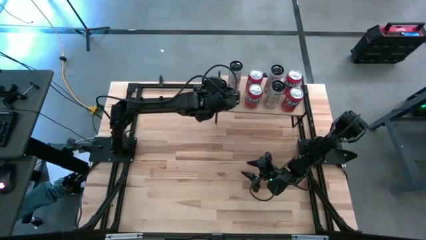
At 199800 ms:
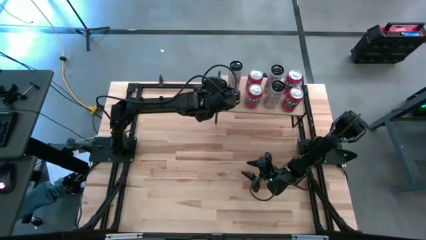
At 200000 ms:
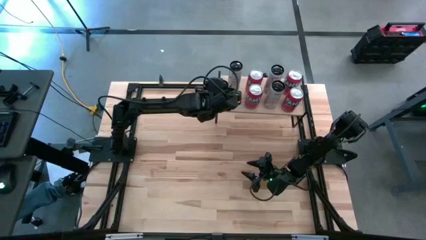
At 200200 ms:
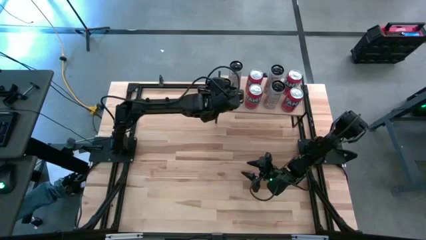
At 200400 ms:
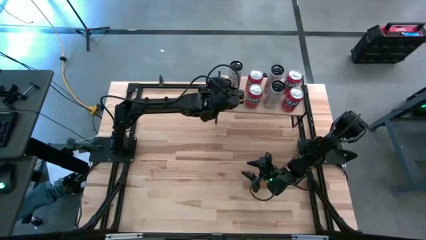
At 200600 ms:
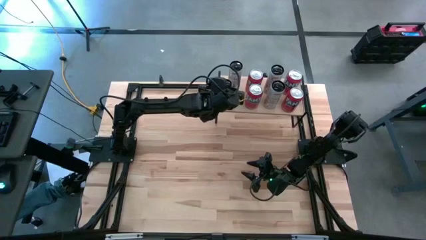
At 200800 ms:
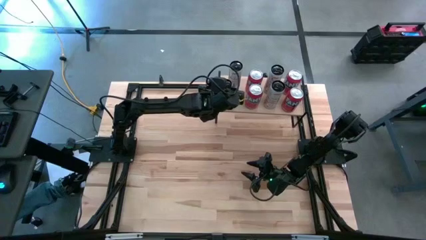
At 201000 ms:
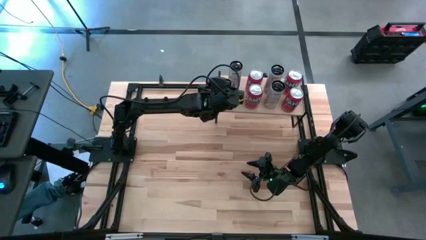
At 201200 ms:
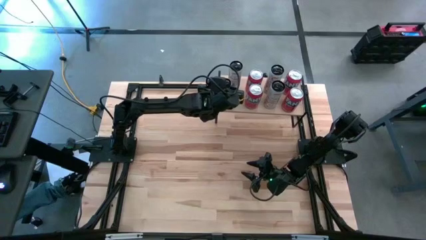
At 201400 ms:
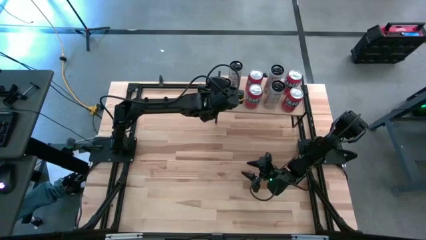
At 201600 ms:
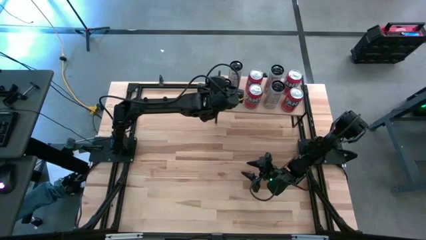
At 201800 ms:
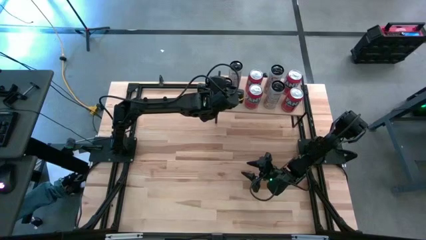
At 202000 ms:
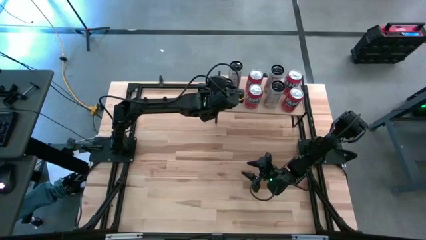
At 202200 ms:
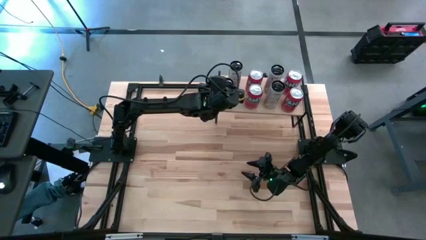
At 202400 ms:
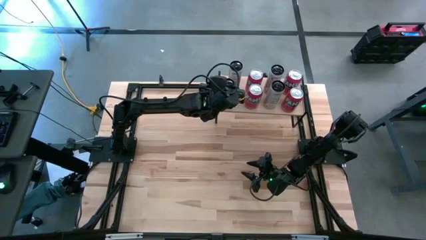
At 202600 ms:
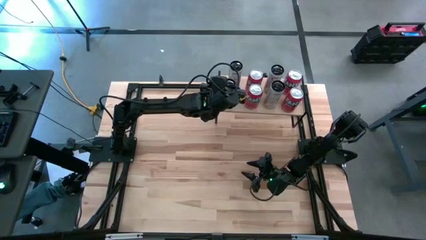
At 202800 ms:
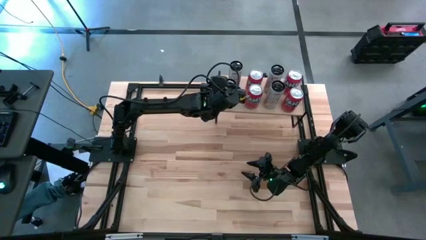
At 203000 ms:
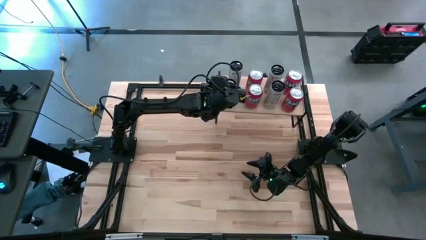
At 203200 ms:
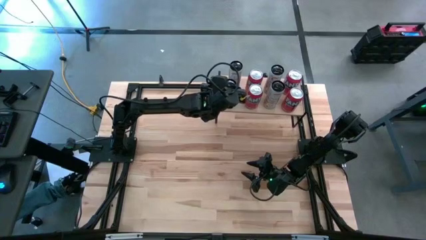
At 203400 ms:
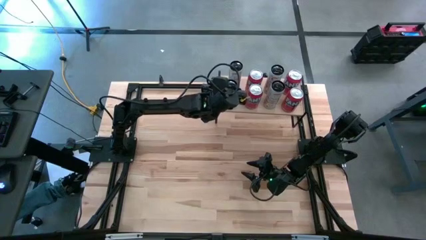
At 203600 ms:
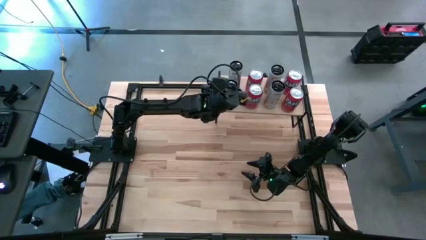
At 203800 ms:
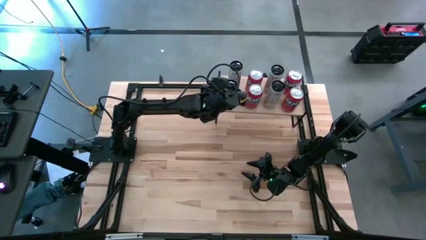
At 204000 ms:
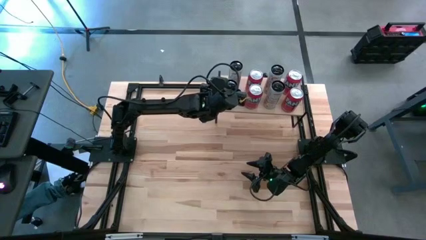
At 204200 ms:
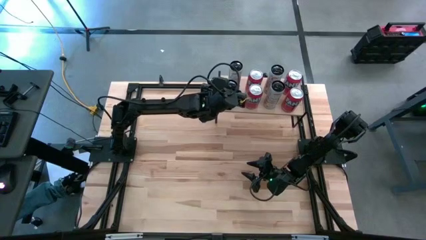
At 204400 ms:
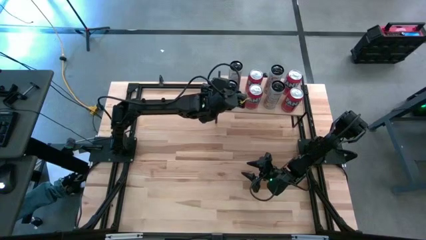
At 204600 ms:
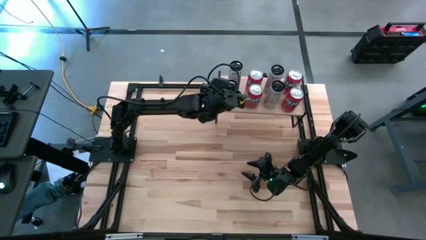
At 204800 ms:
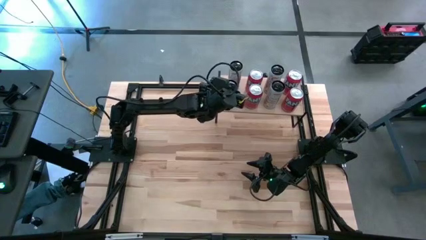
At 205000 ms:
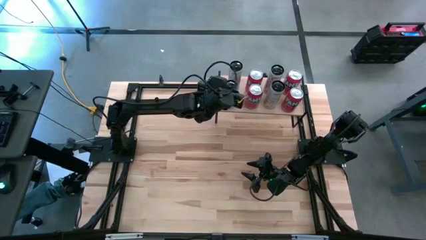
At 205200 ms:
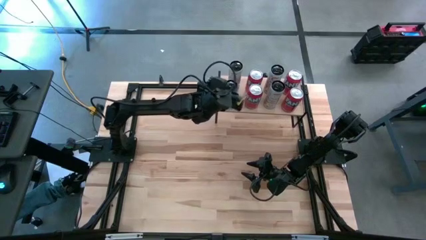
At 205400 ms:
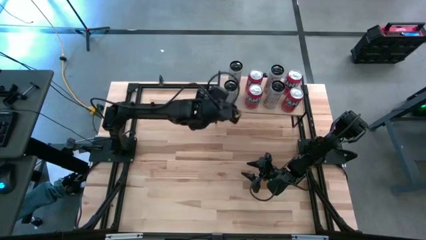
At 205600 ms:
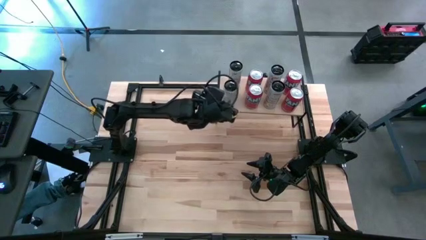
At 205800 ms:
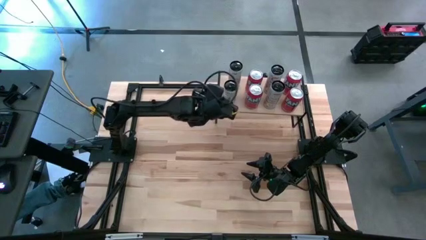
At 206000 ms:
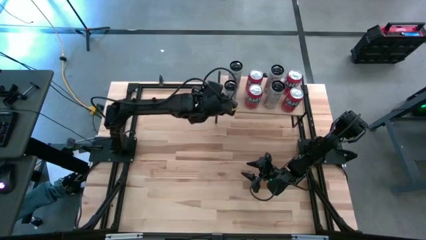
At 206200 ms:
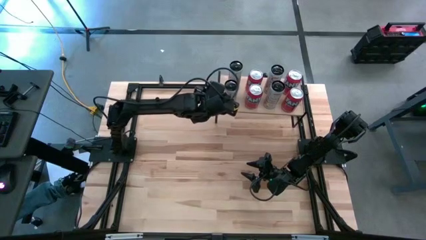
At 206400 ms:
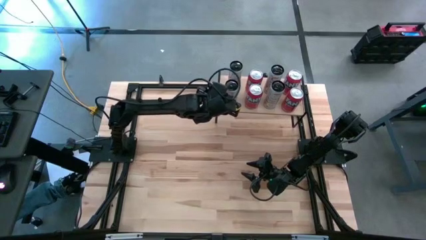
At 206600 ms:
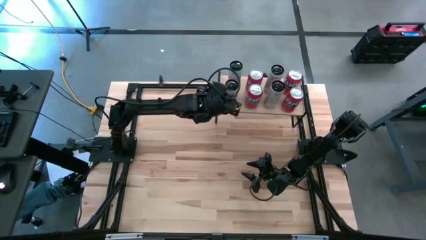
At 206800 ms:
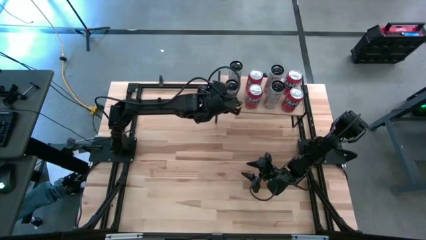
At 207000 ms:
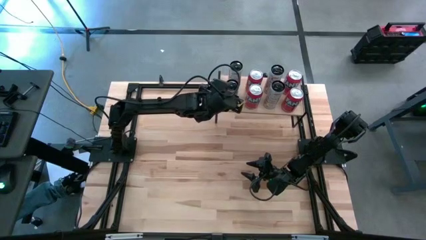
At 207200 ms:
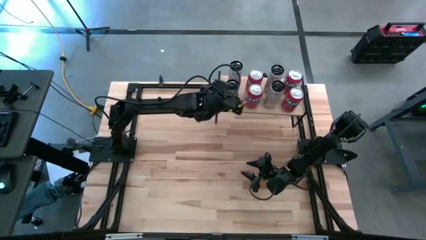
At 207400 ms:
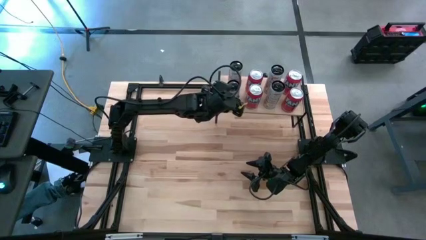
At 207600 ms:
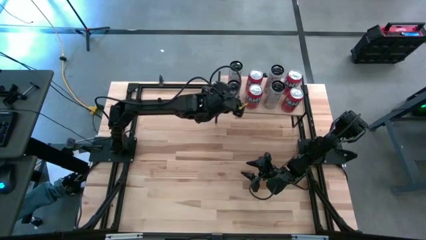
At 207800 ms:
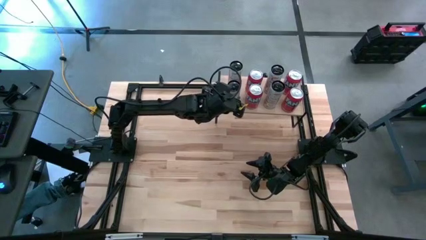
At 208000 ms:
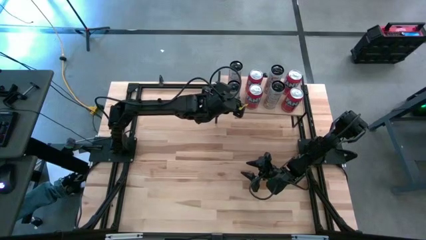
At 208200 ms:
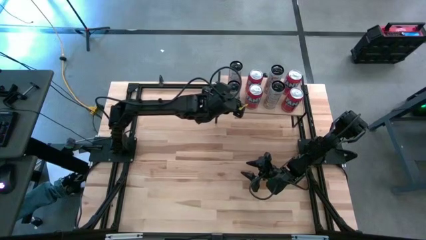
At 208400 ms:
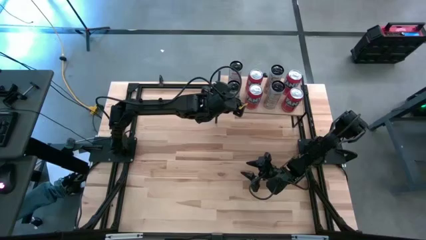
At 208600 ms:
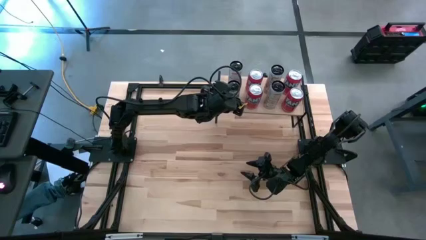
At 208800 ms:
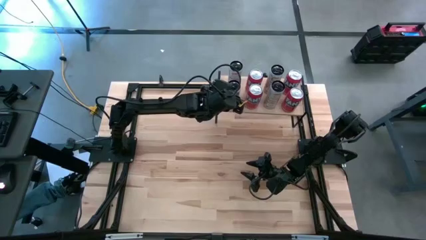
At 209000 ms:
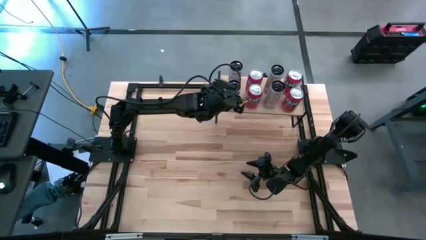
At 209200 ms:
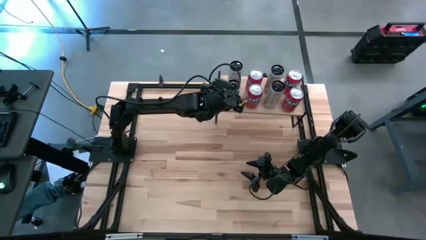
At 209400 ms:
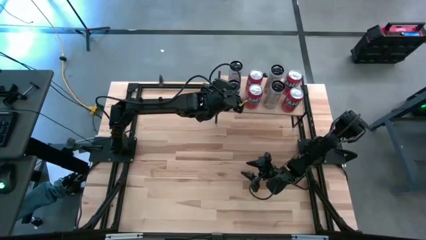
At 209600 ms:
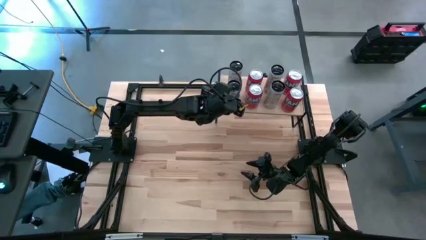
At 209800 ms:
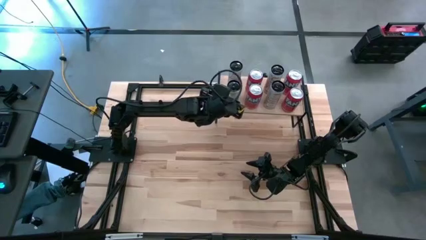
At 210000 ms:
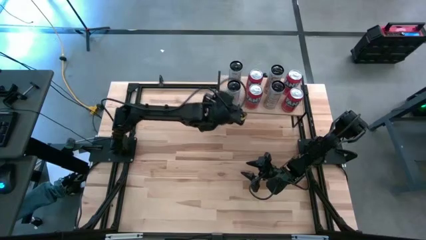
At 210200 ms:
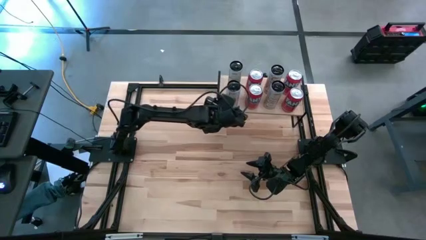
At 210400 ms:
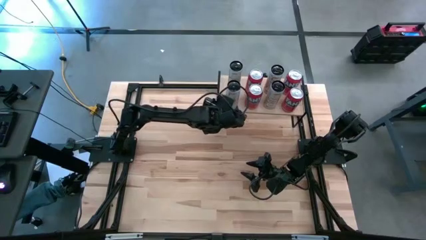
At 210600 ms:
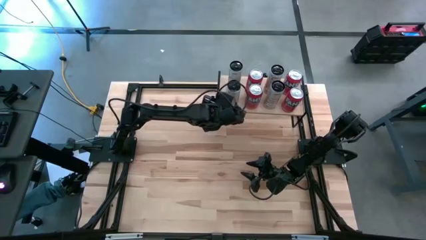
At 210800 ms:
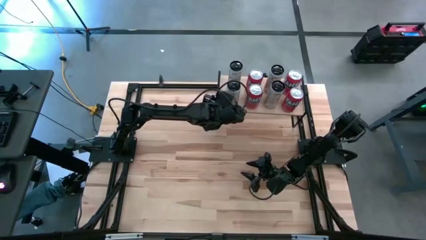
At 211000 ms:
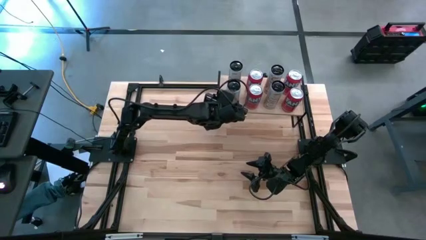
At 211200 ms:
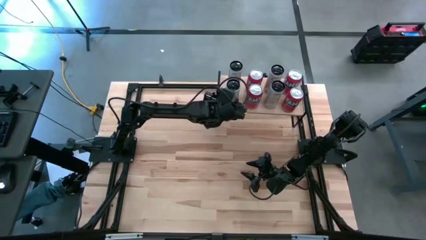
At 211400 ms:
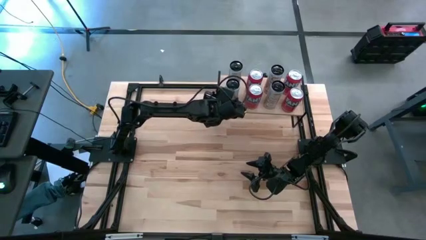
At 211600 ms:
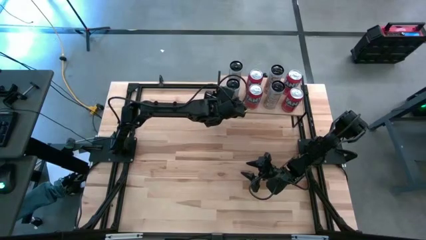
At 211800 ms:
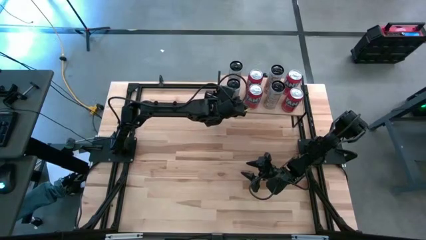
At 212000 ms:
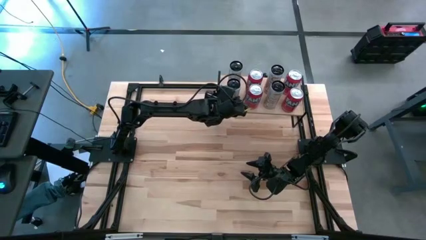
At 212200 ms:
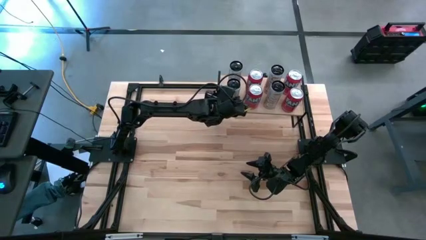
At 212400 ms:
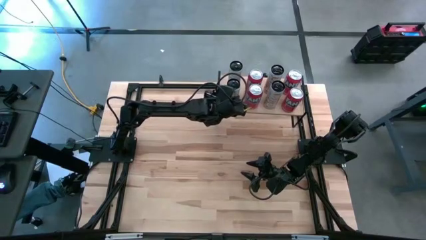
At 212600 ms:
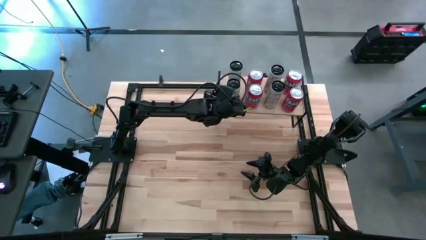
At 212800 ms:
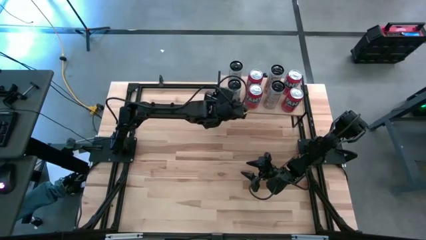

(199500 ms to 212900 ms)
Task: Place canned beverage on shelf
Put the white soda can on the shelf aligned with the other white soda can

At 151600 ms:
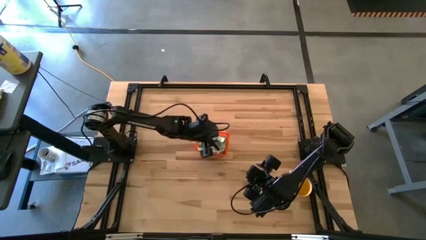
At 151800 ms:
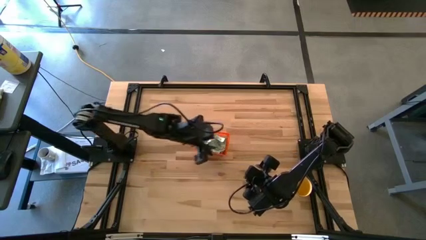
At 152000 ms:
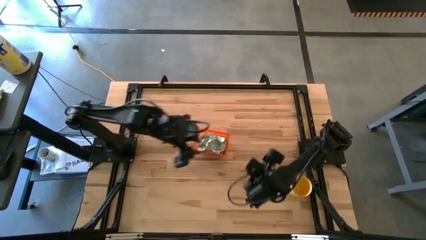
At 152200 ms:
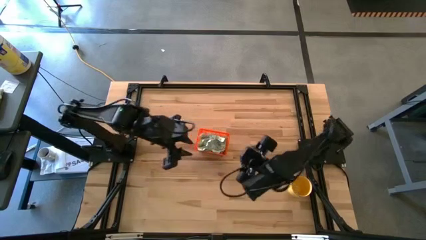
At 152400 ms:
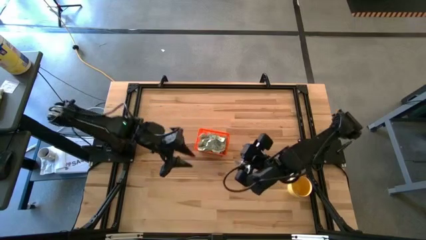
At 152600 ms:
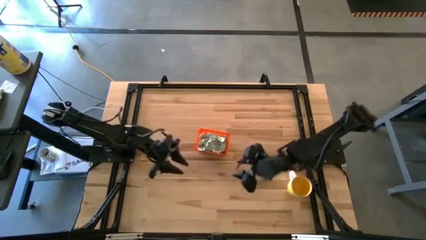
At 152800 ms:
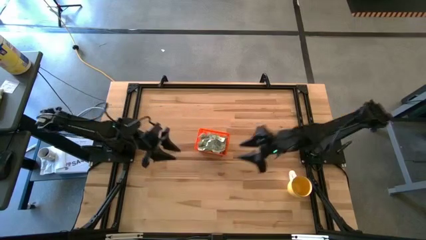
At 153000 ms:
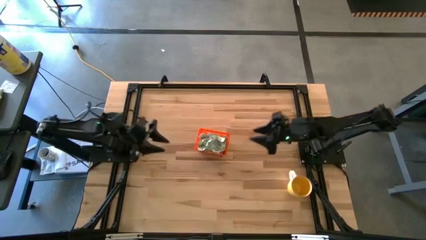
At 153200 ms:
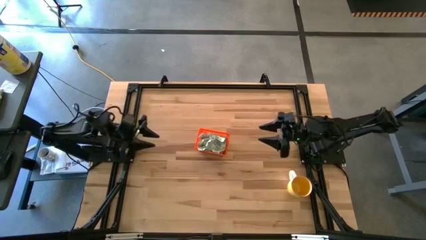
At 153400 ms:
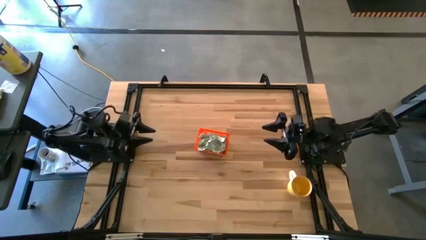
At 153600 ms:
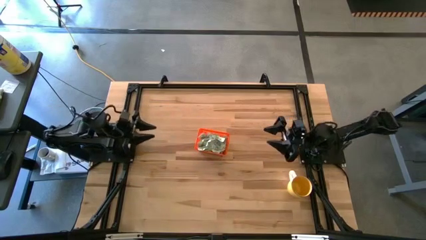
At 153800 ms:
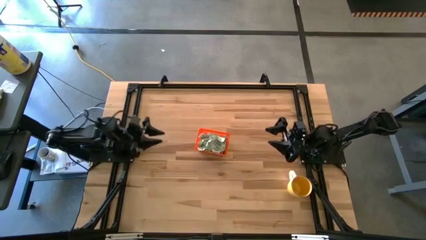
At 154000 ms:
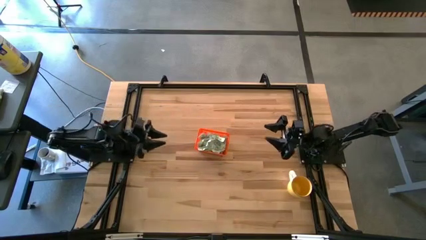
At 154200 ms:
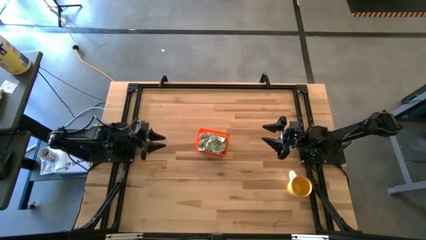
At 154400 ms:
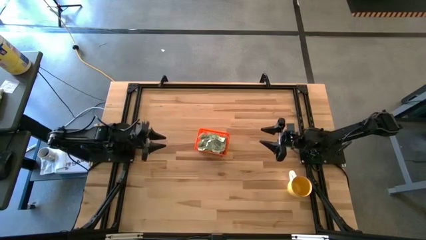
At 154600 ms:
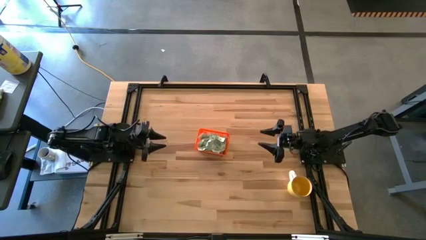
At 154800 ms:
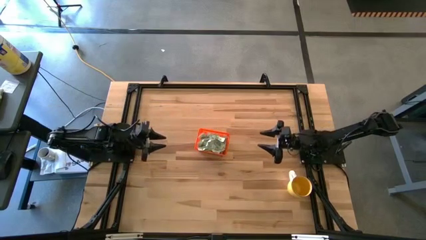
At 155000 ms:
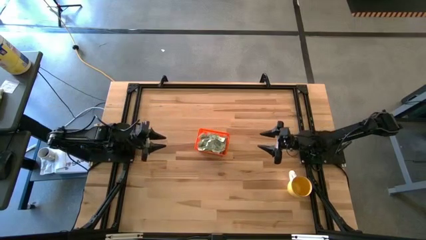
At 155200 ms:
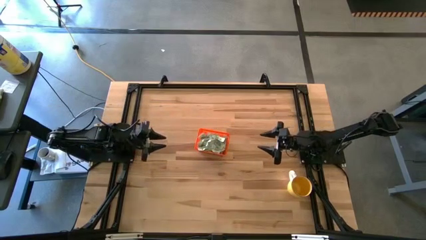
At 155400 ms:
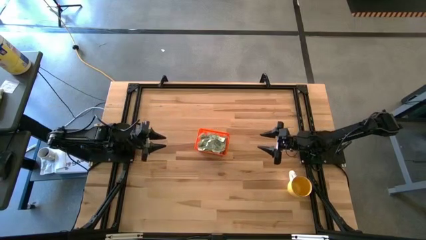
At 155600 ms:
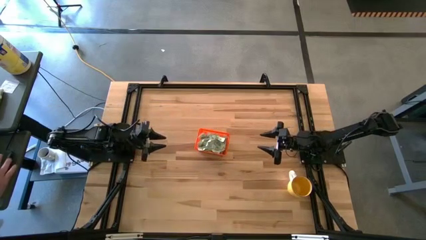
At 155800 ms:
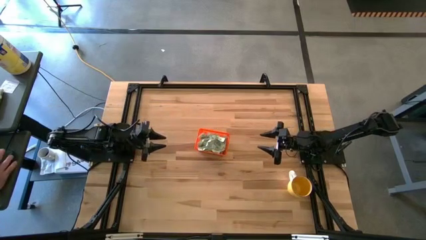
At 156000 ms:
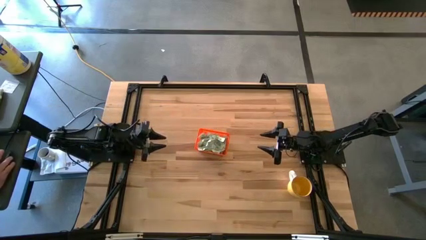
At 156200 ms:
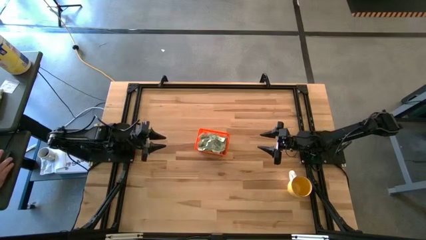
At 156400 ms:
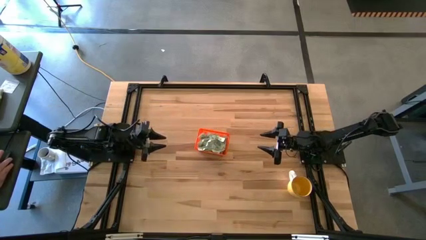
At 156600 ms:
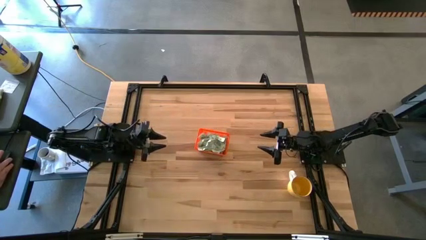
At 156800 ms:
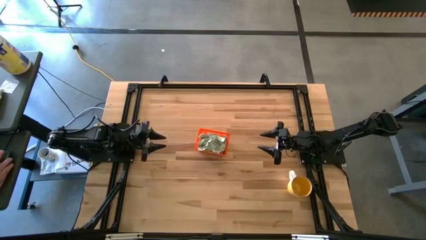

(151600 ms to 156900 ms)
Task: Pick and place Stevia / Truvia into bins
Return to Home Position
